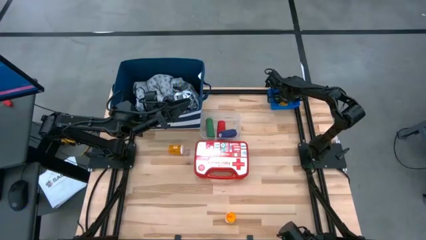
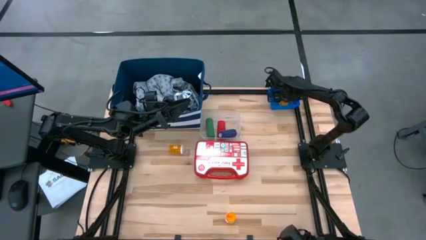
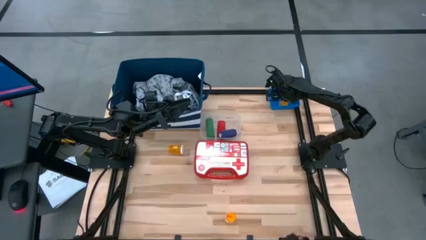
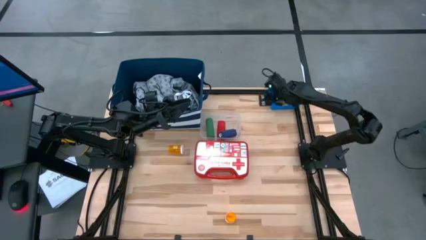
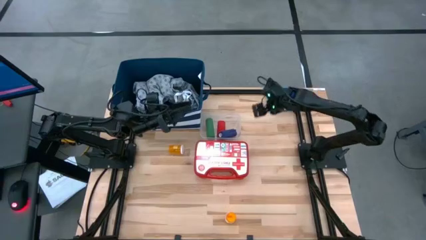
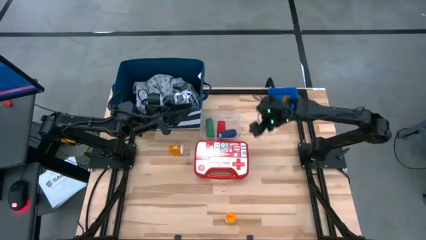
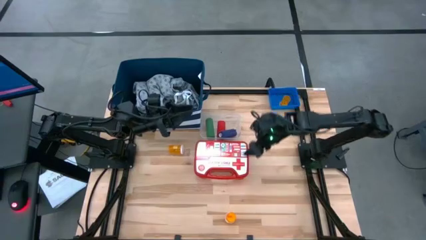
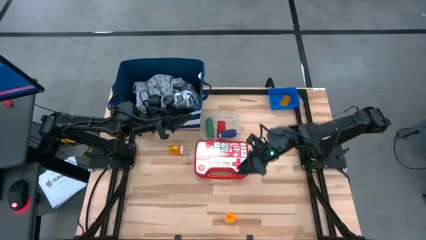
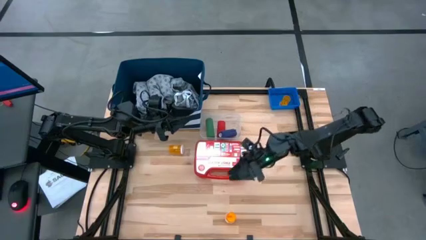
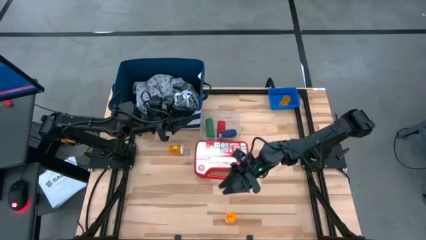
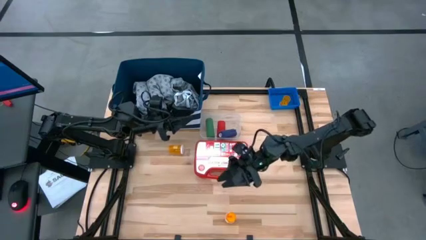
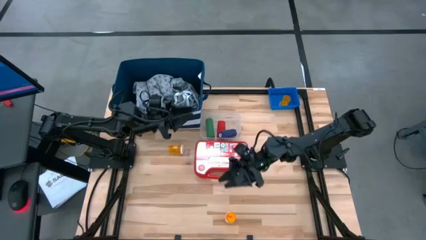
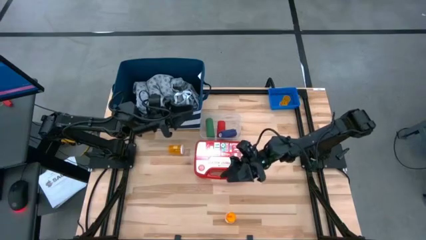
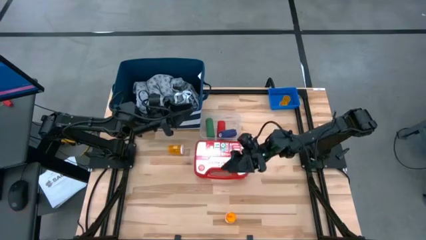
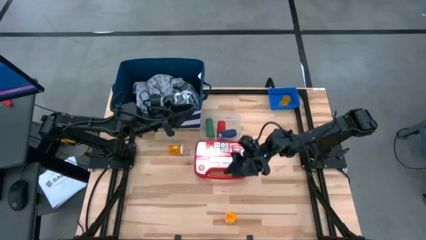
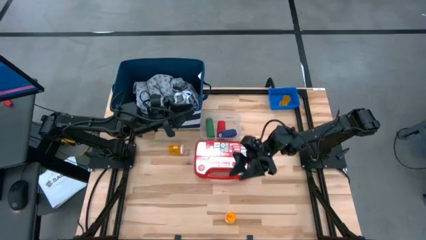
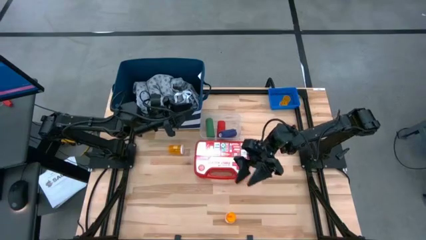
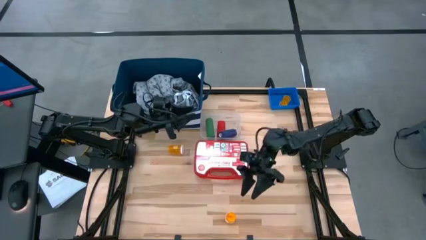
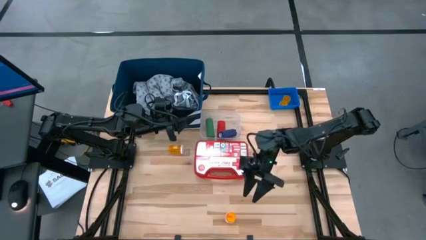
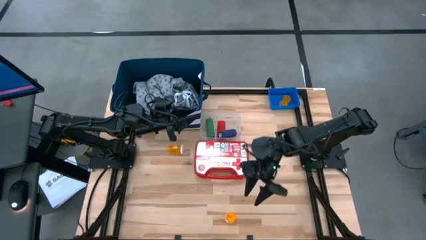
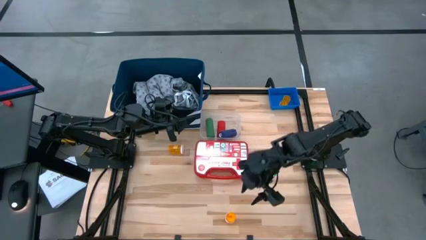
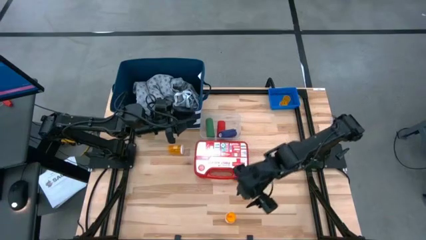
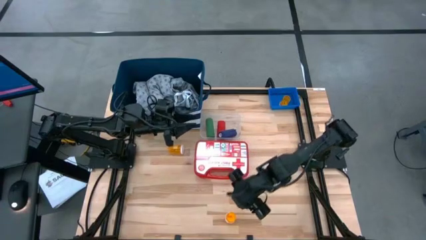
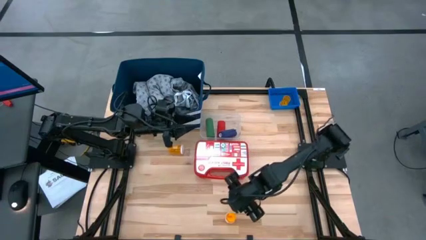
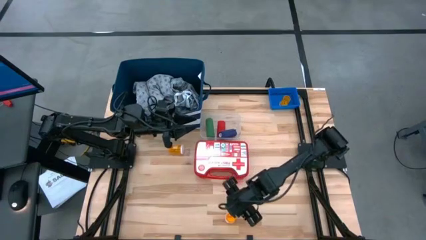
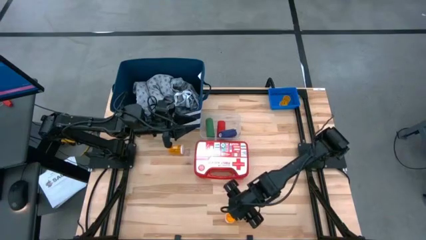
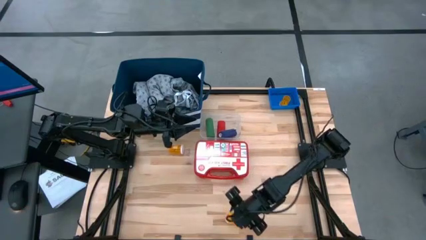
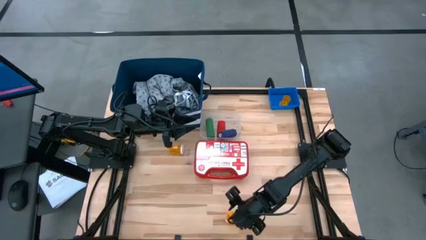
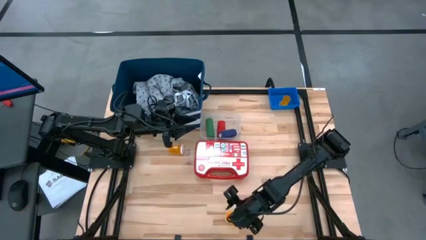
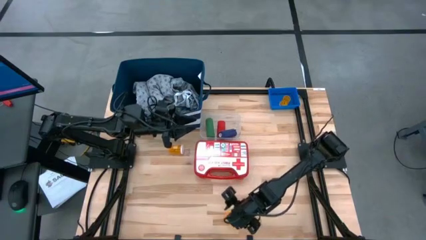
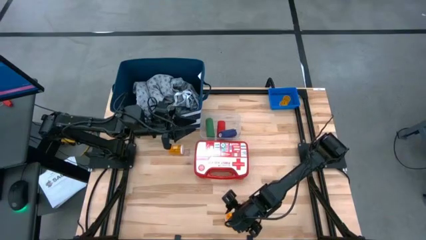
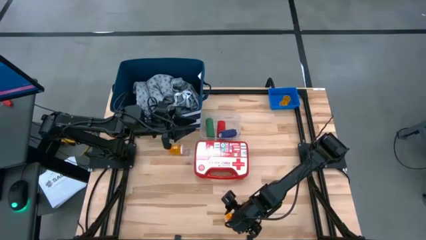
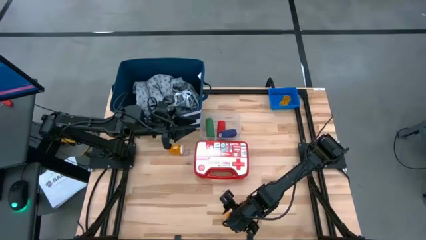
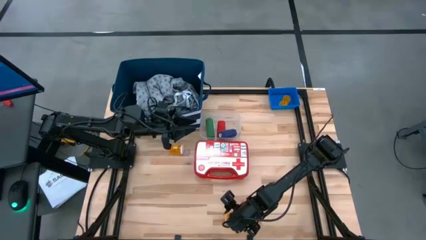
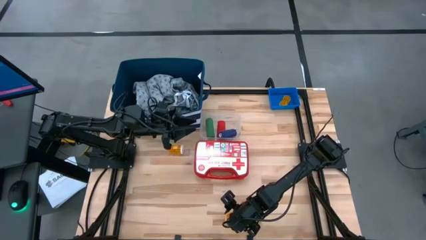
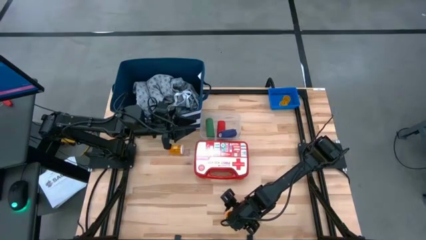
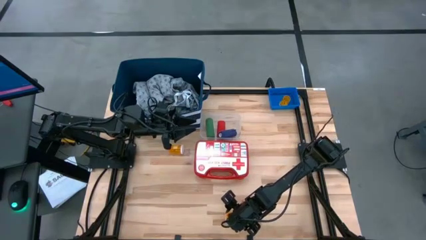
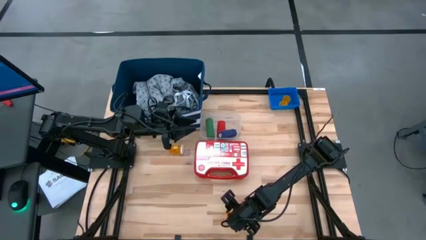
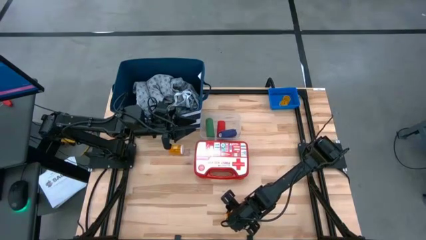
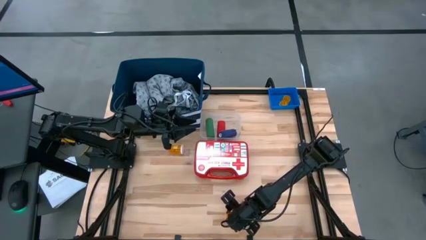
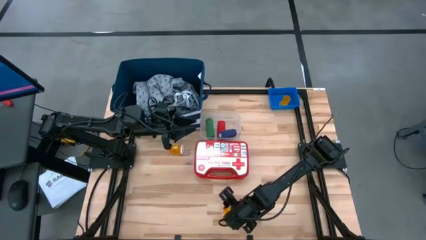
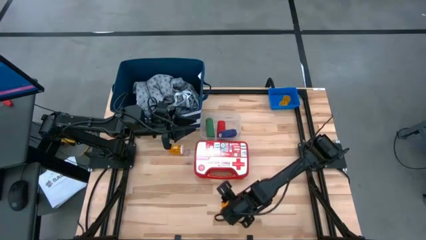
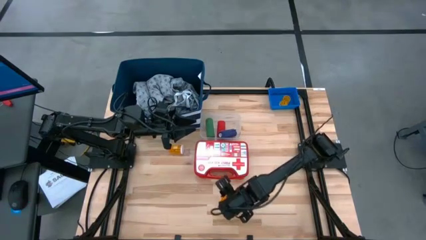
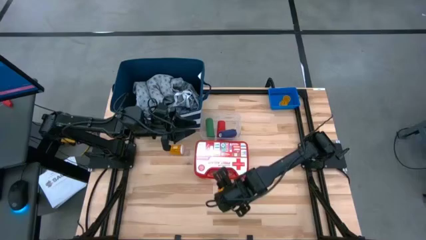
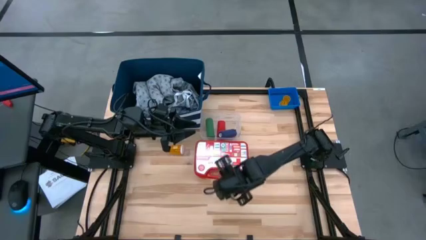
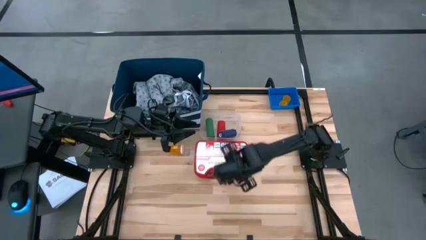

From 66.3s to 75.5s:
Task: Pick & place medical supplies in basket/bin
Put the bottom orange pill bottle into the blue bin

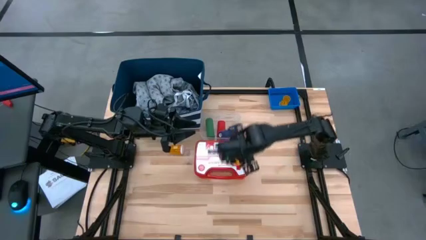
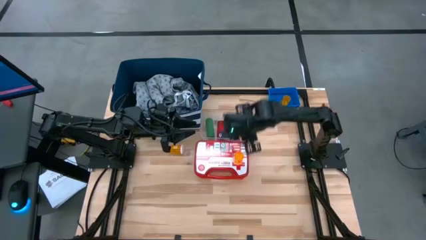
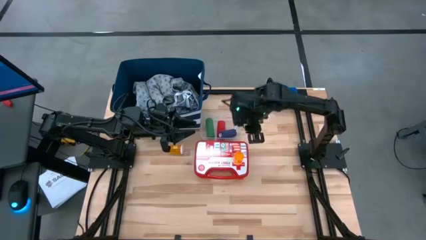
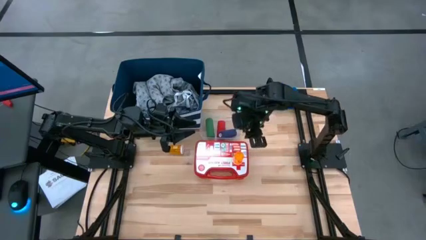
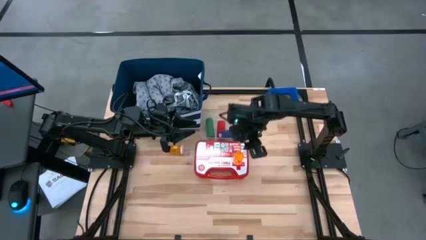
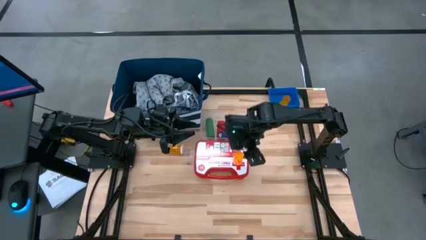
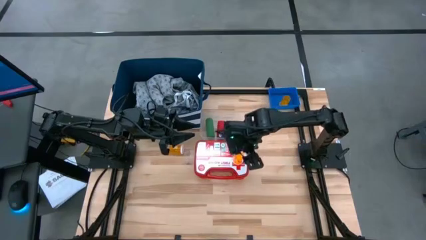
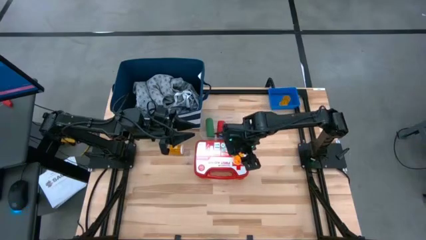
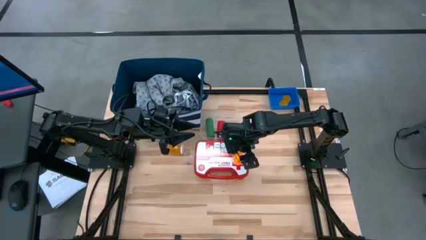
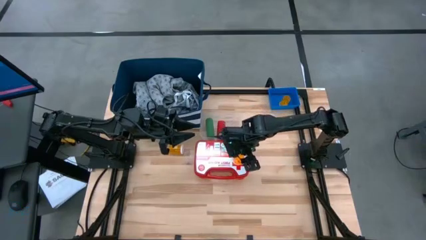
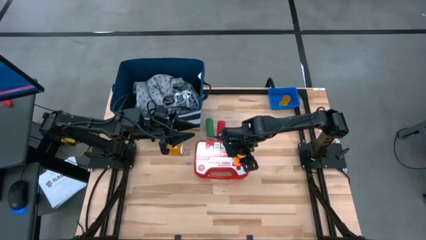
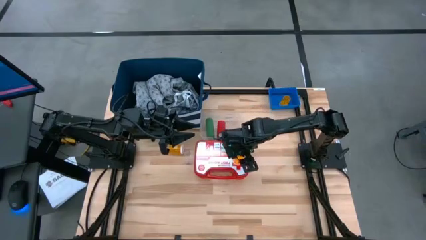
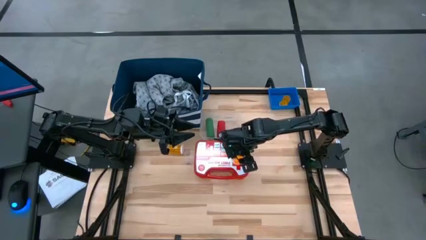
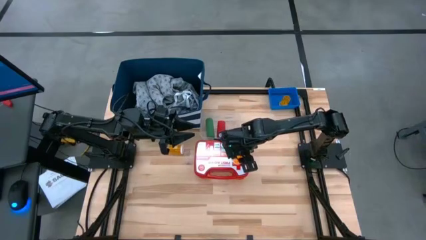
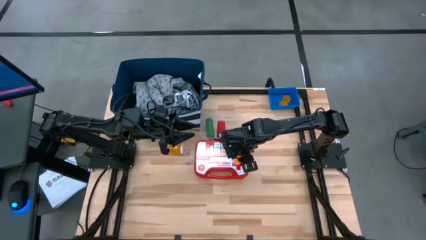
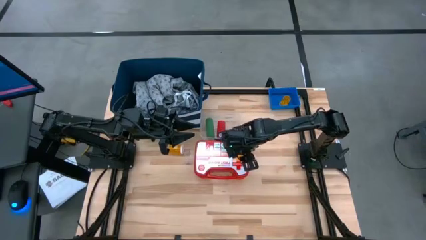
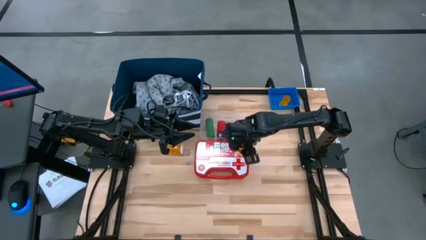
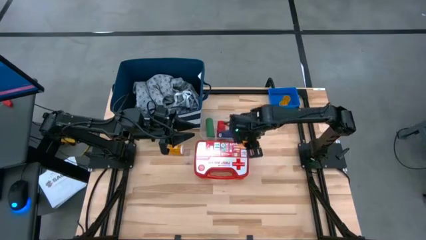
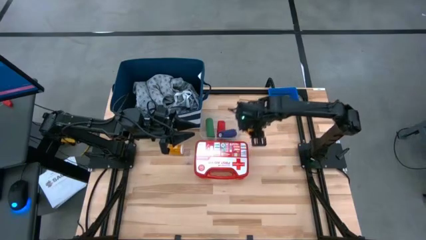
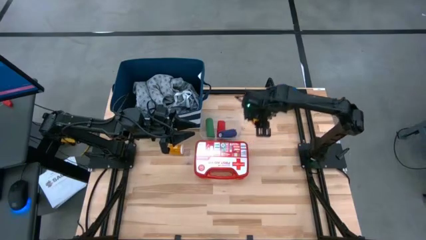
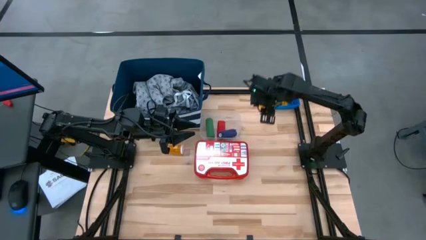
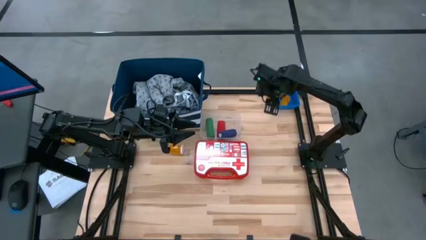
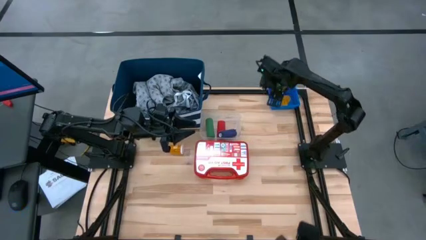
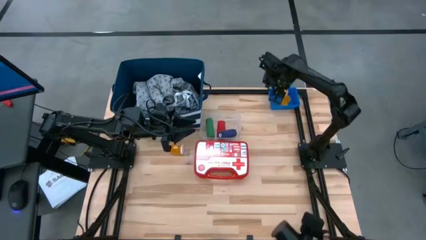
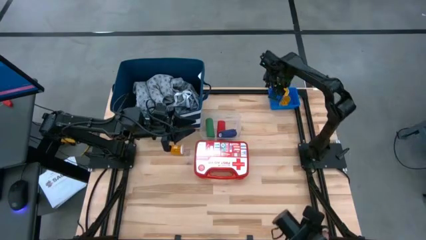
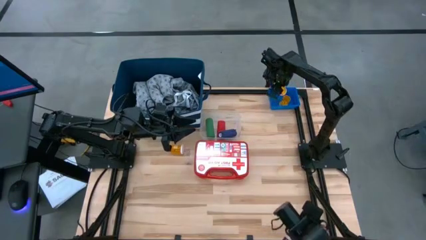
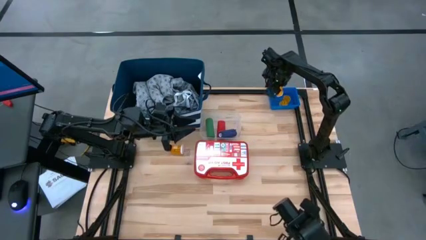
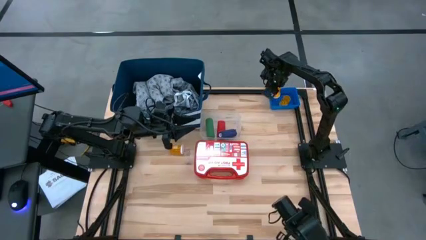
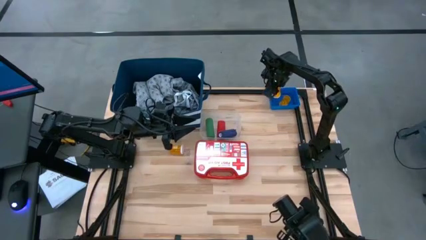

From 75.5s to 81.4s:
Put the bottom orange pill bottle into the blue bin

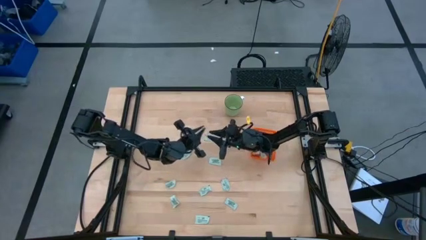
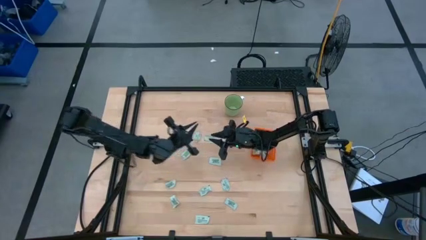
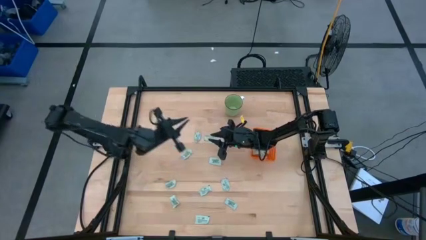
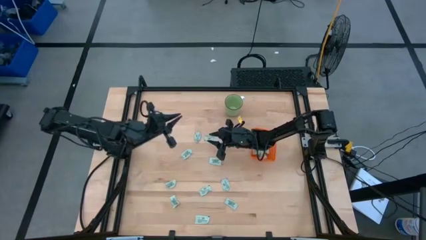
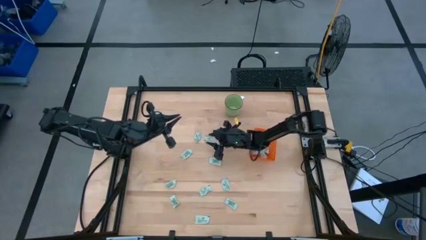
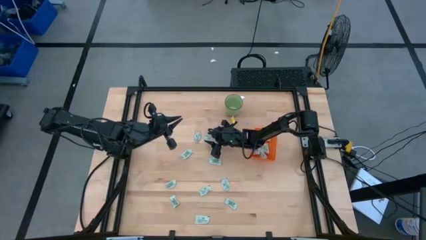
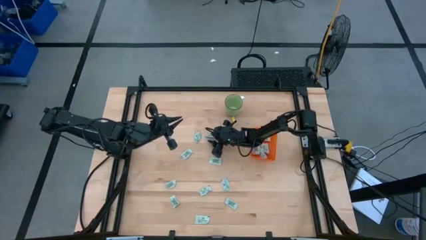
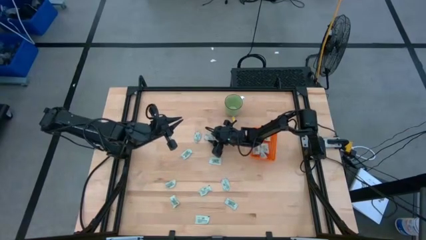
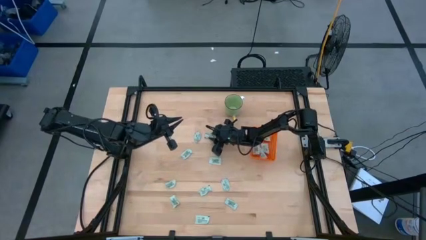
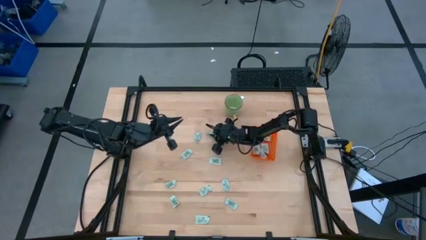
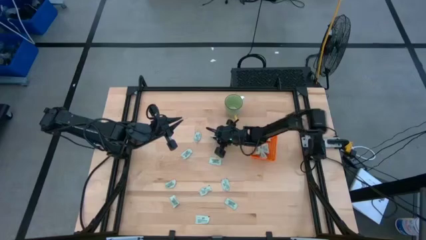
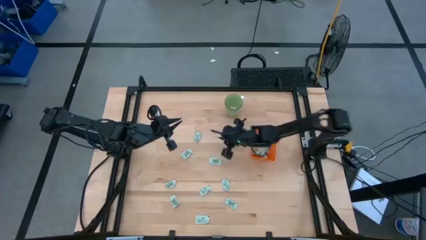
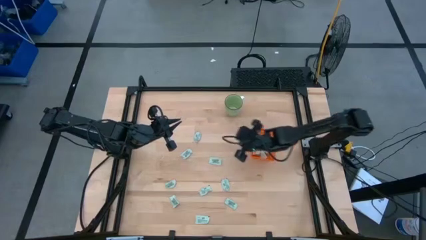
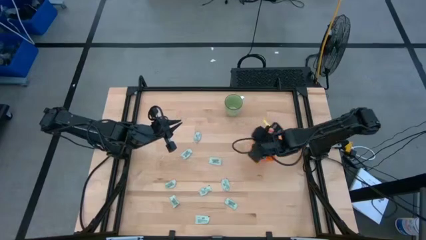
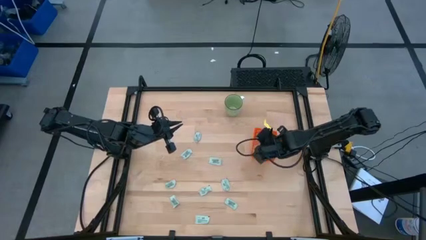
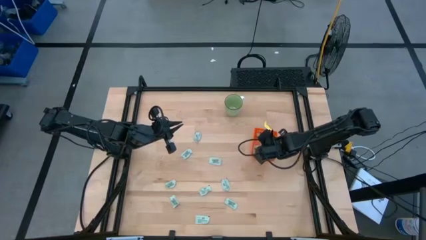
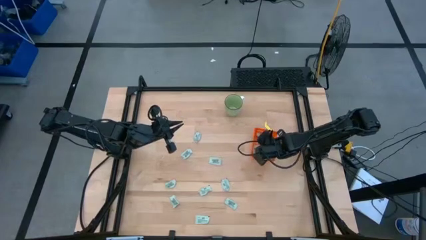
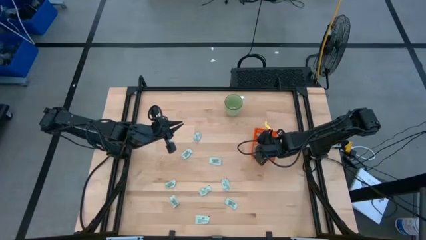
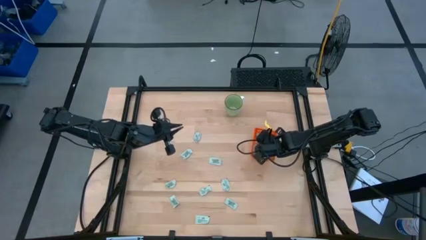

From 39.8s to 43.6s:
Task: Pick and place Stevia / Truvia into bins
Put the light green packet into the orange basket
